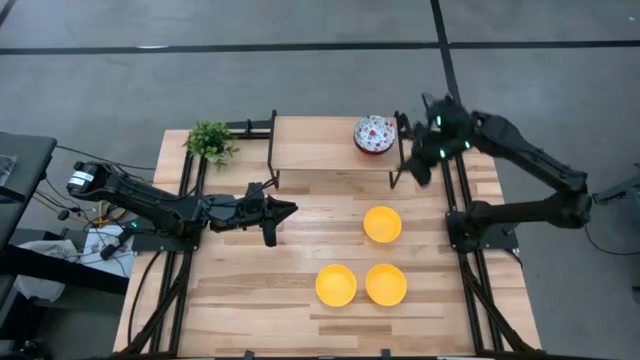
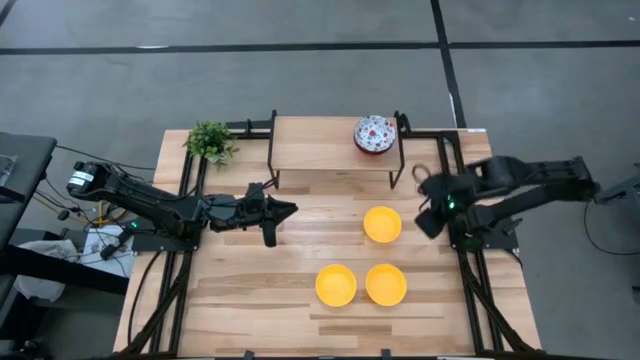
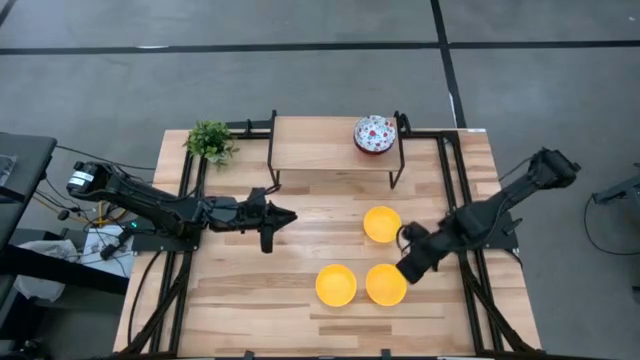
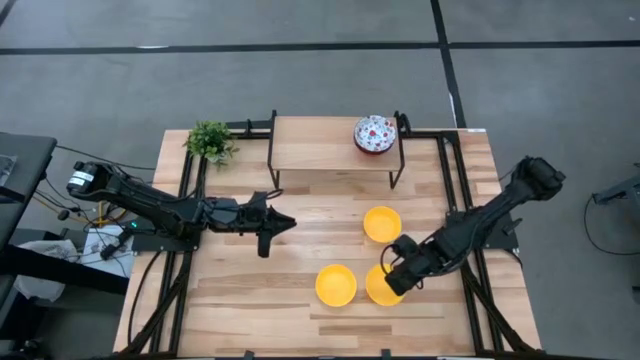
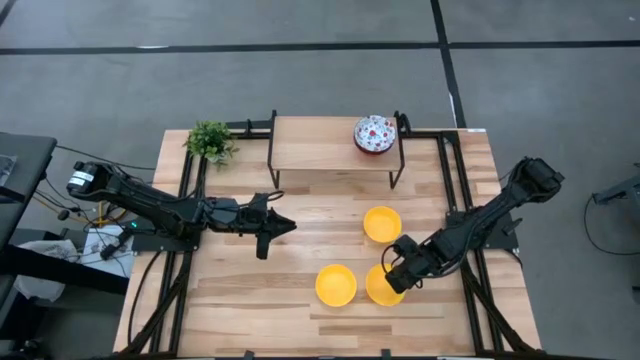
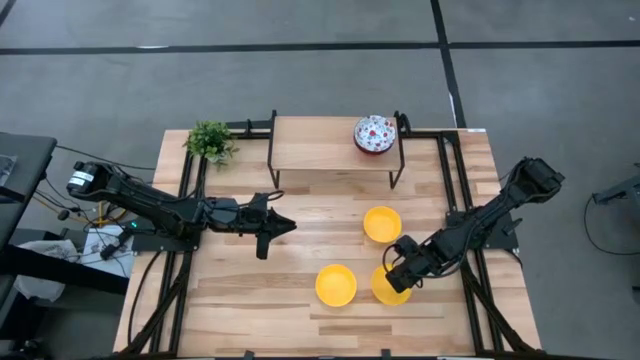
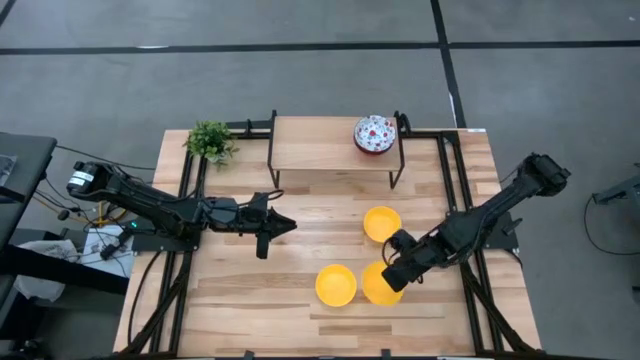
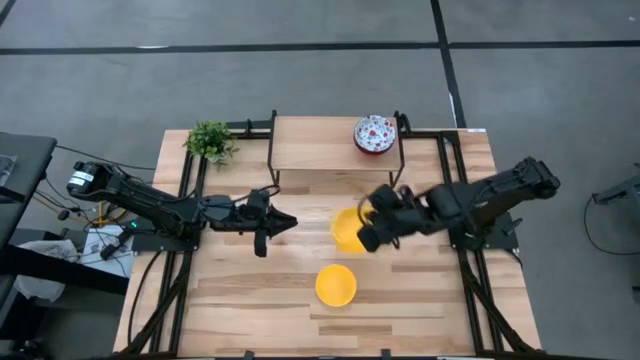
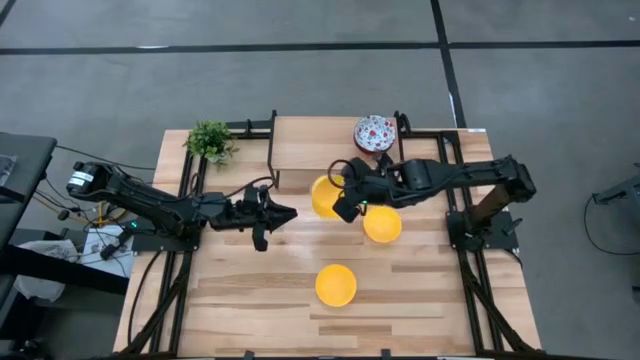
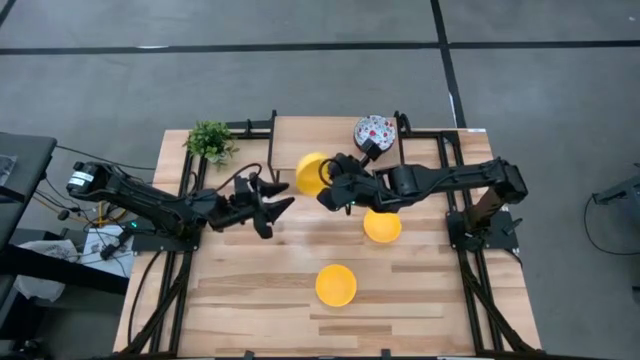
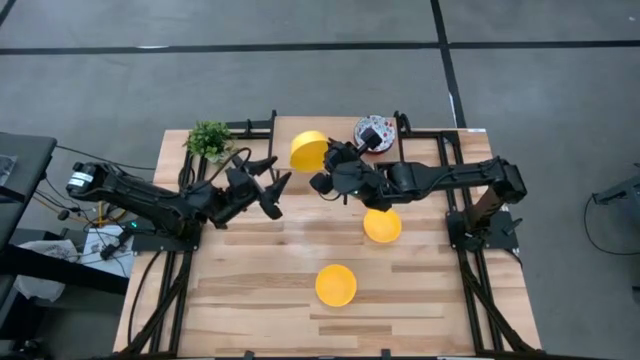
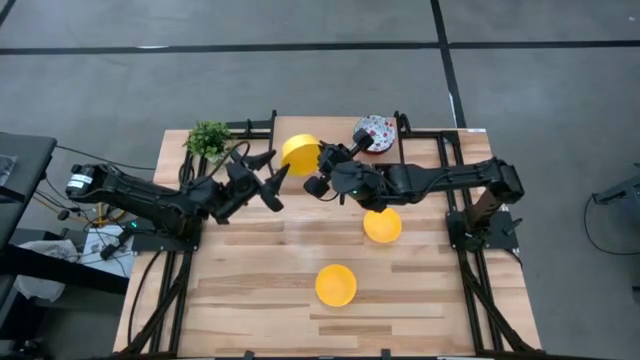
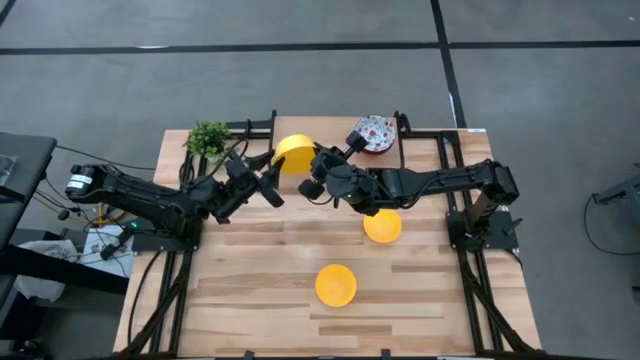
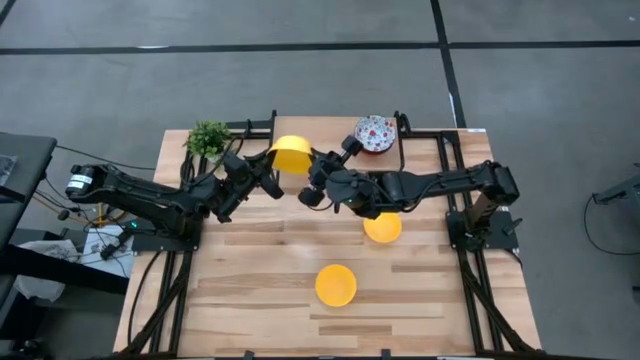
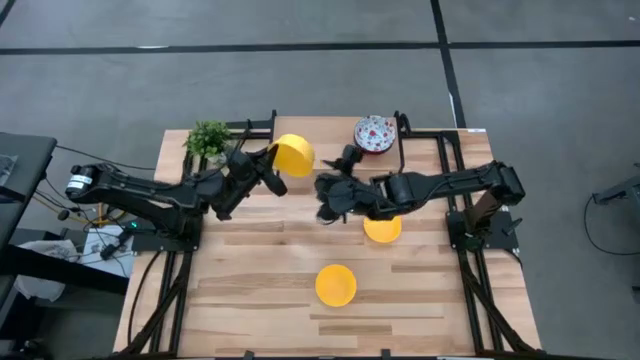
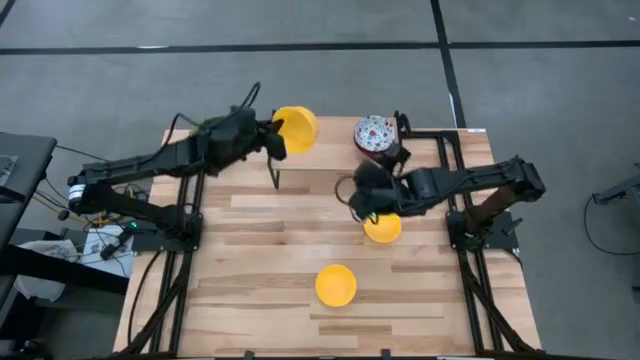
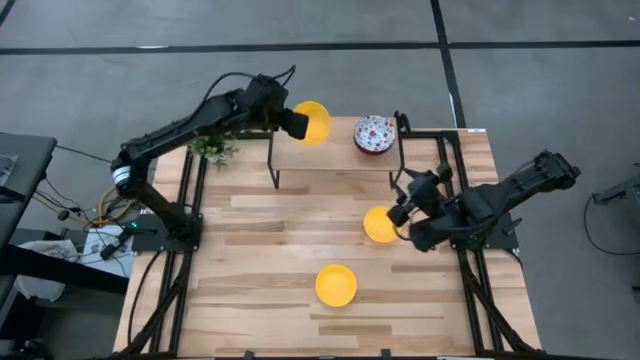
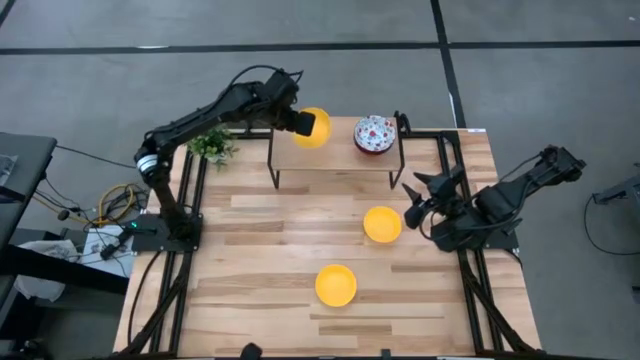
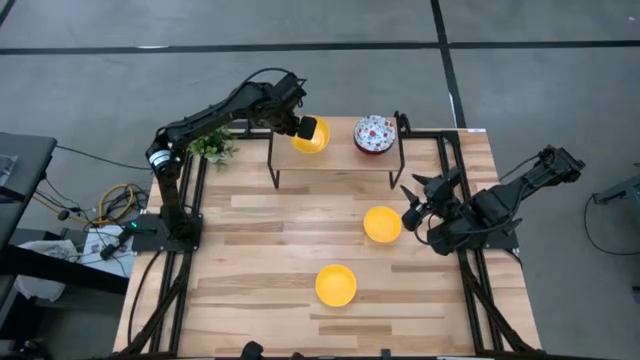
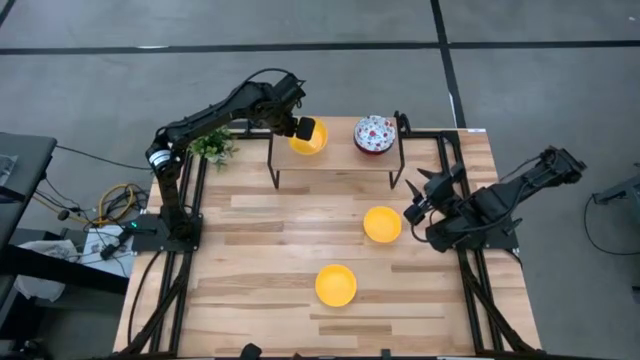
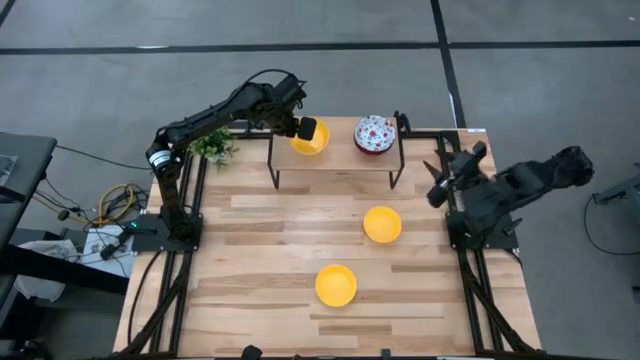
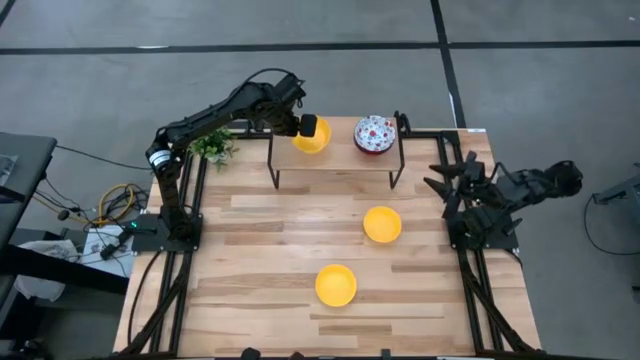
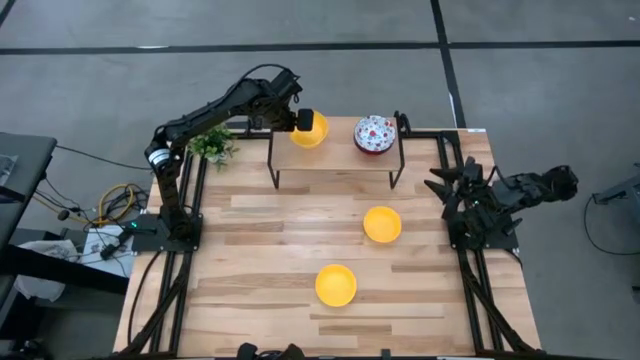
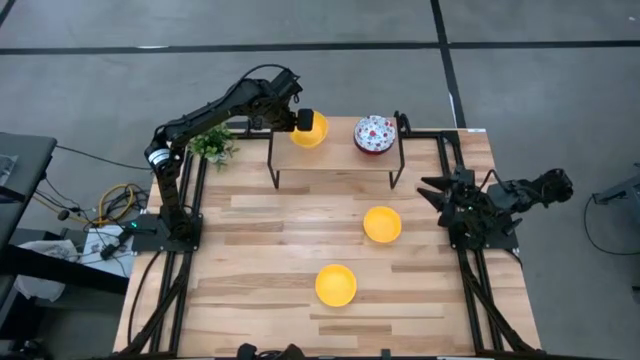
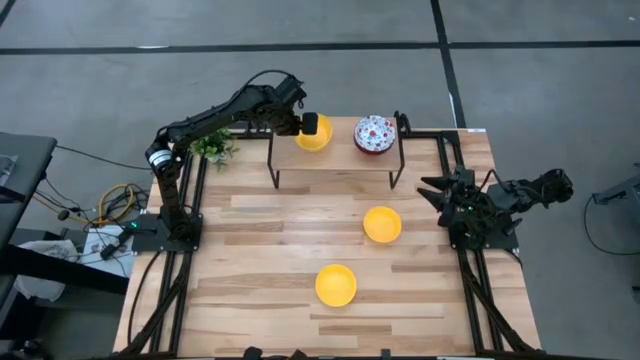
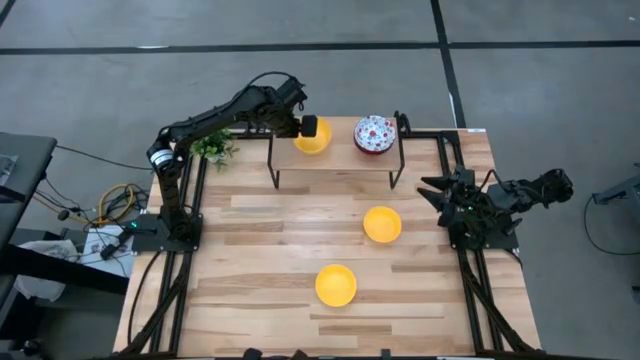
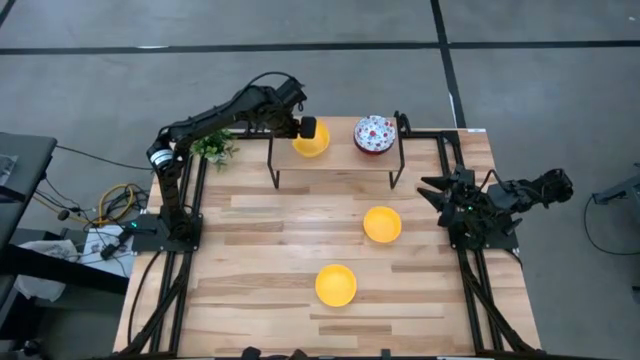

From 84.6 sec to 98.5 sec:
Task: Pick & Place Mini bowls
Put the bottom right yellow bowl on the shelf

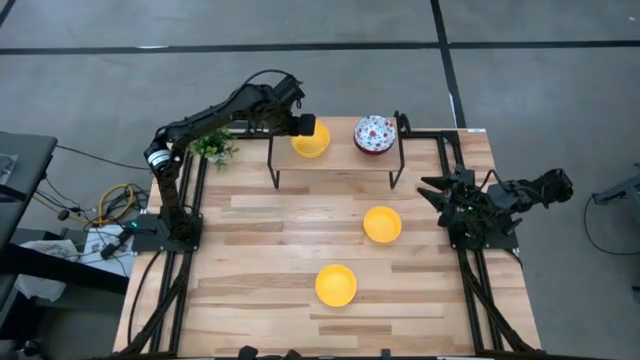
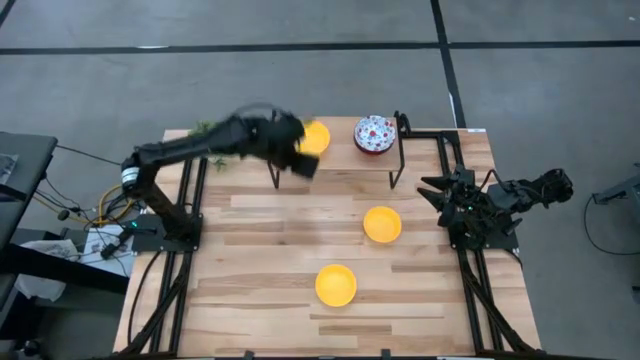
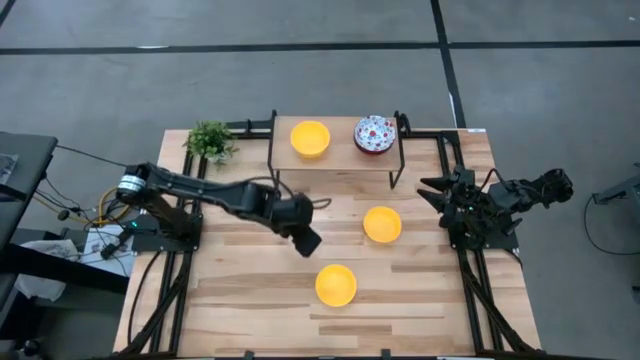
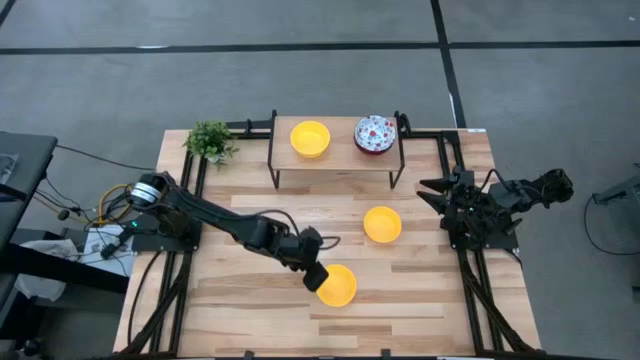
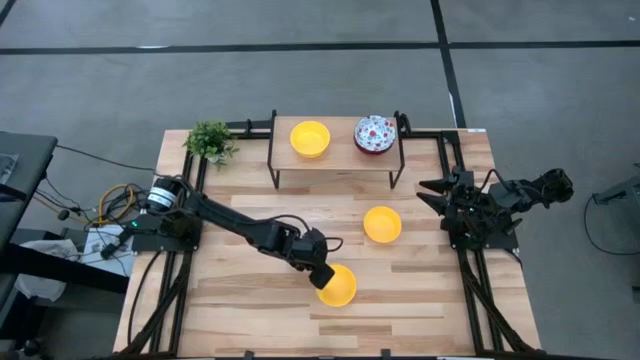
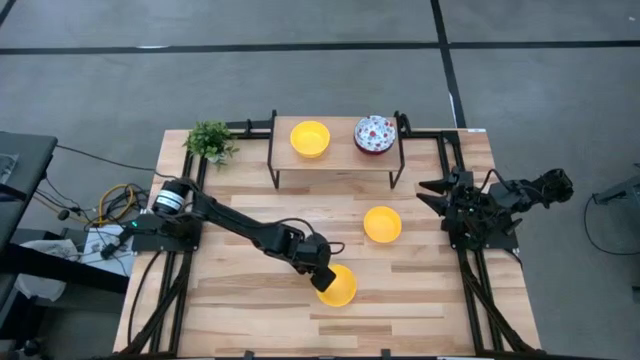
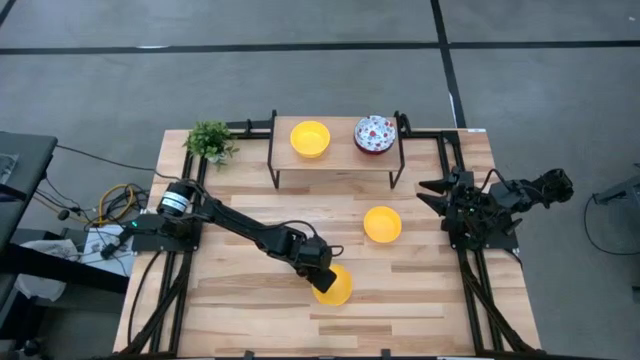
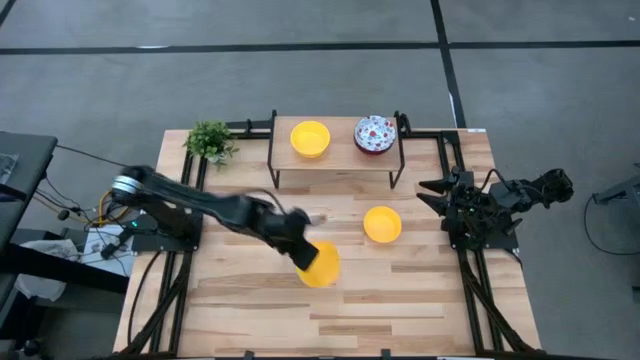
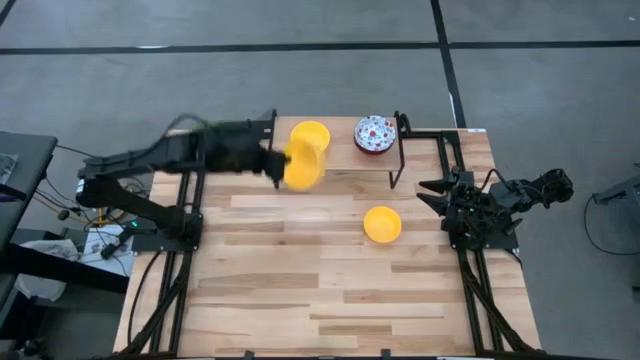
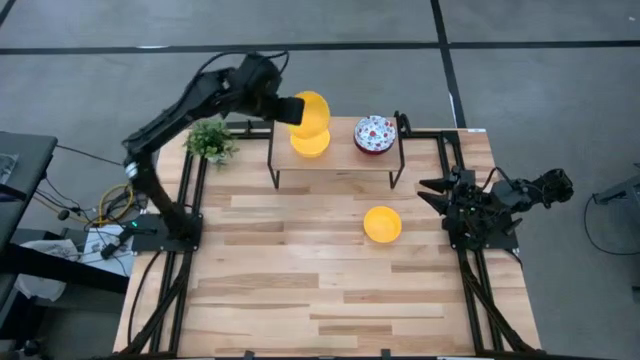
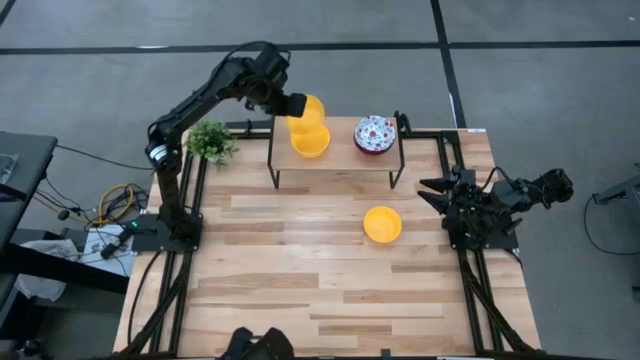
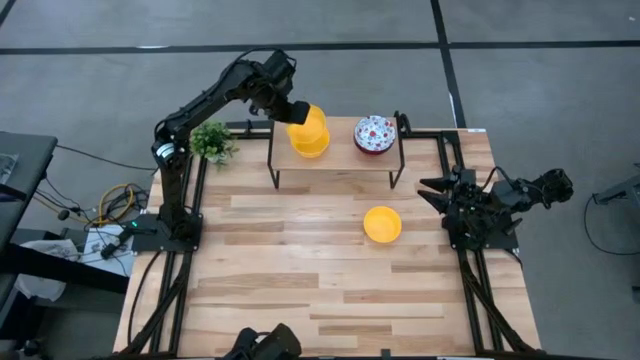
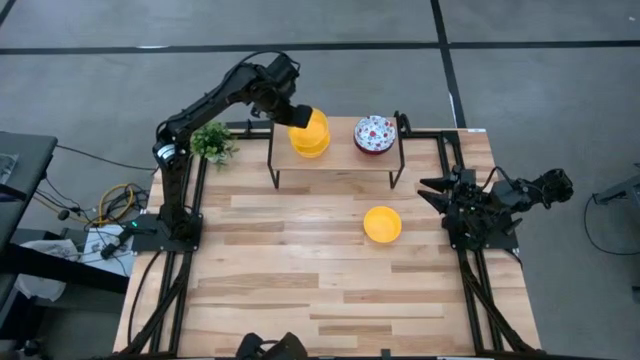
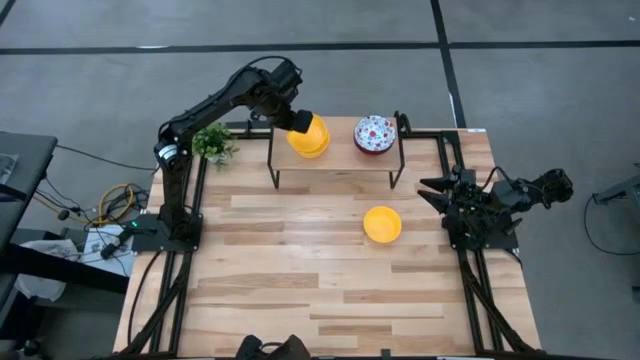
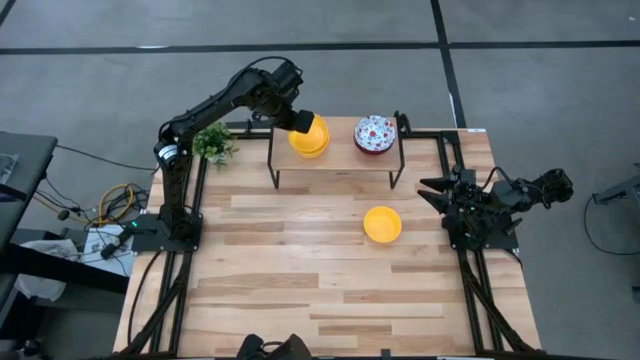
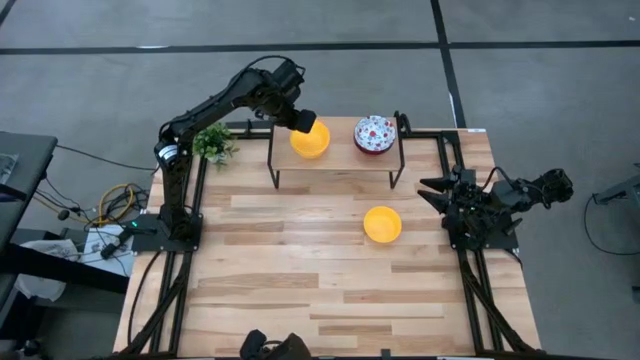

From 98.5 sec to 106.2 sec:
Stack the bottom yellow bowl on top of the yellow bowl on the shelf

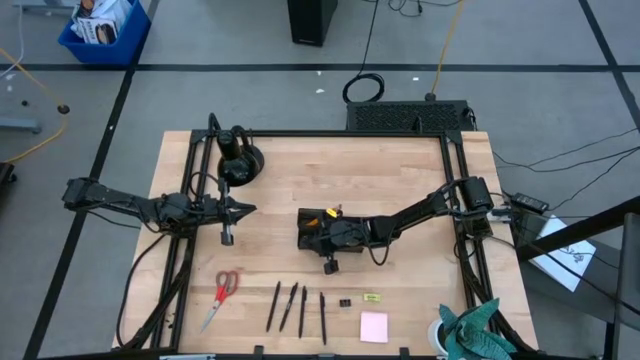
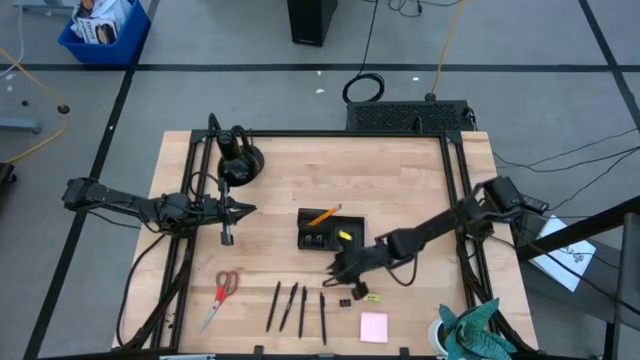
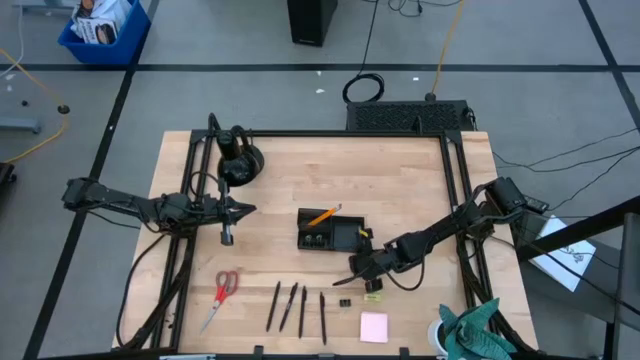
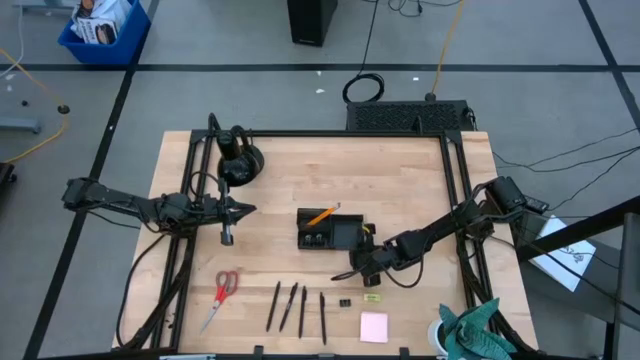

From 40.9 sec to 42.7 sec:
Task: Pick and place office supplies into organizer
Adjust the black desk organizer
